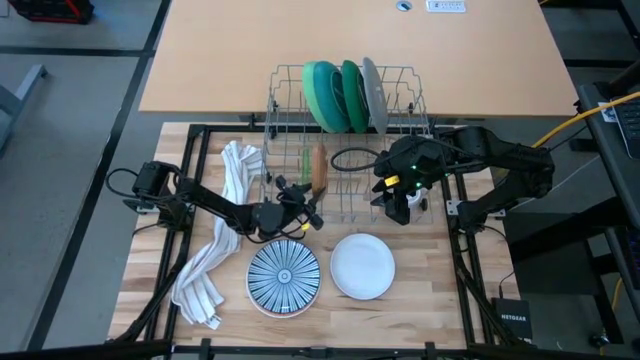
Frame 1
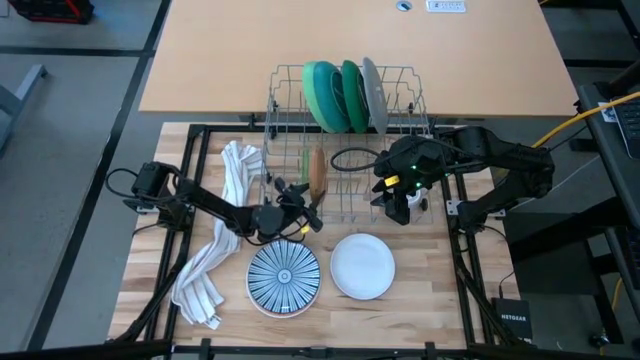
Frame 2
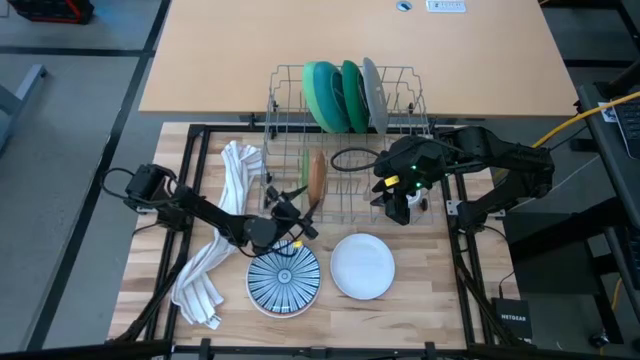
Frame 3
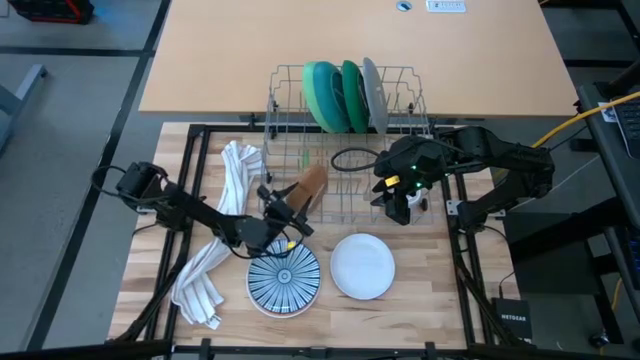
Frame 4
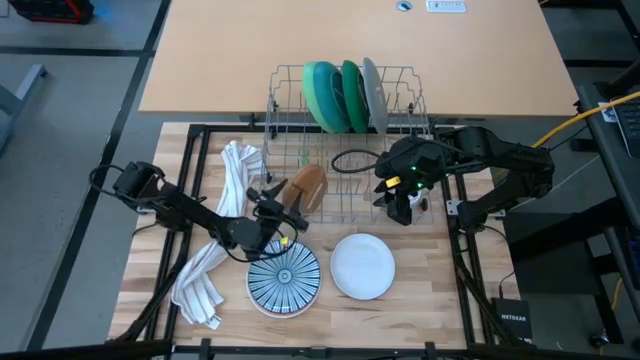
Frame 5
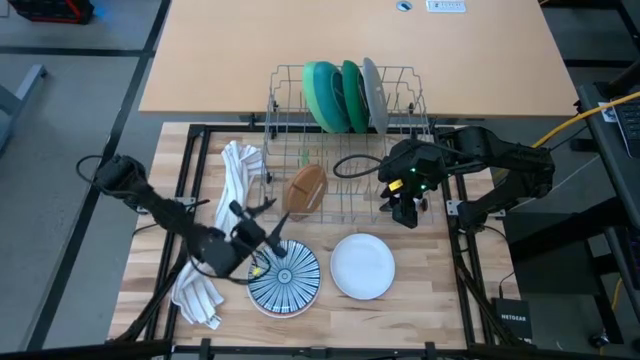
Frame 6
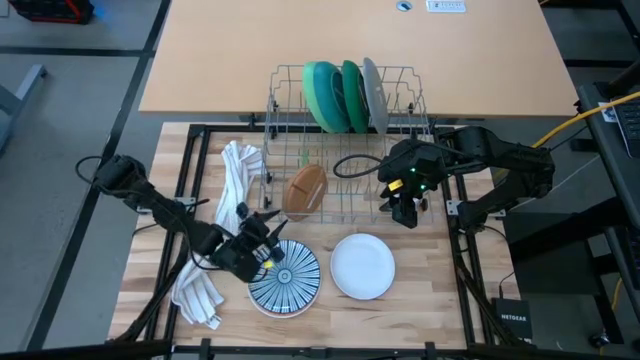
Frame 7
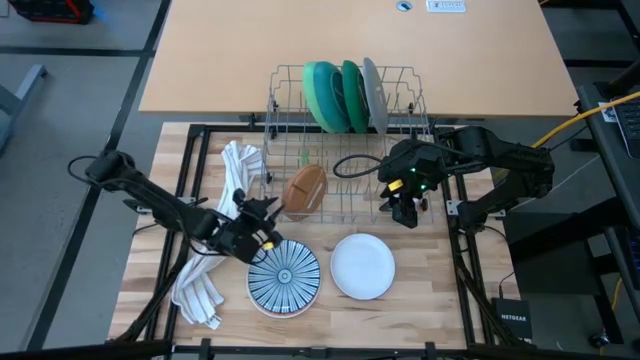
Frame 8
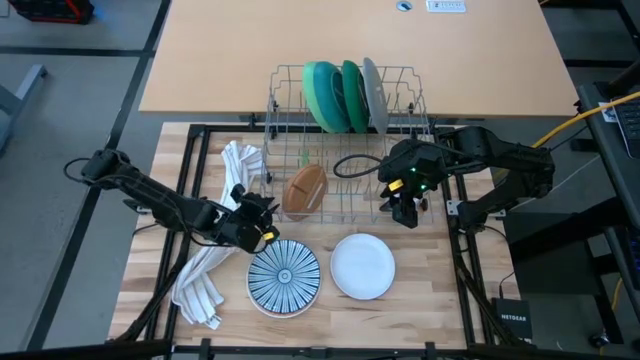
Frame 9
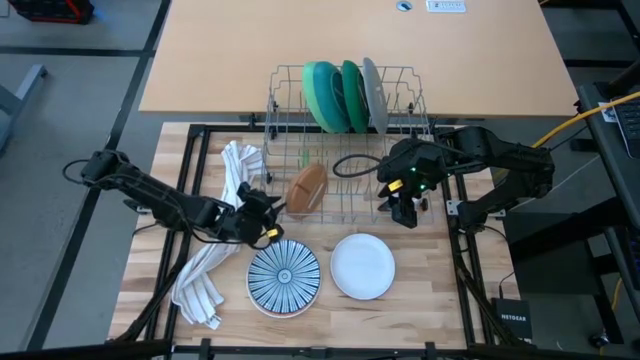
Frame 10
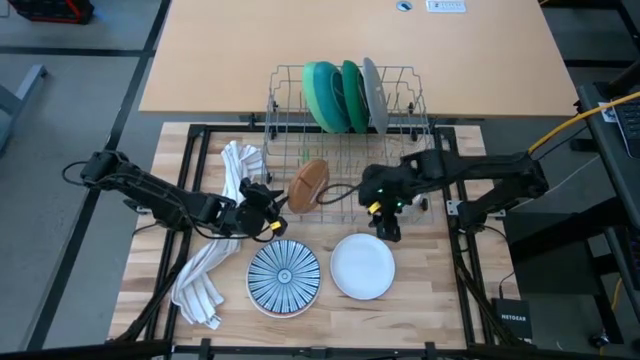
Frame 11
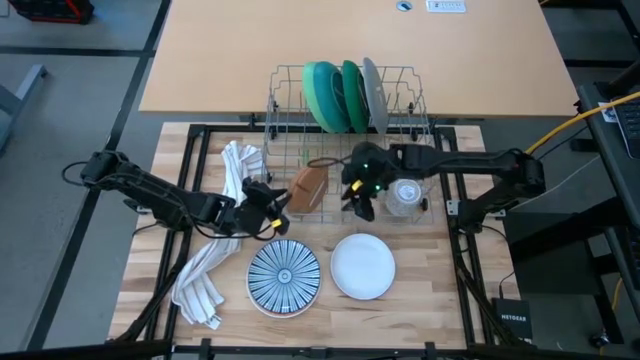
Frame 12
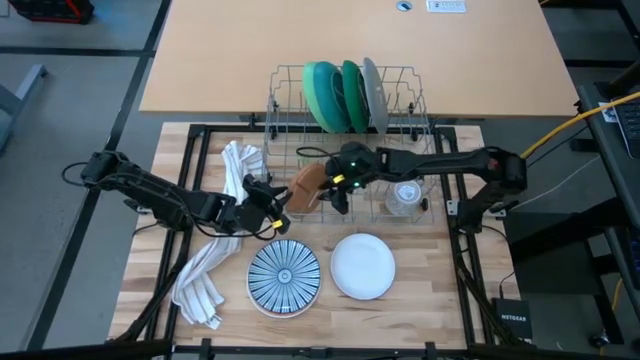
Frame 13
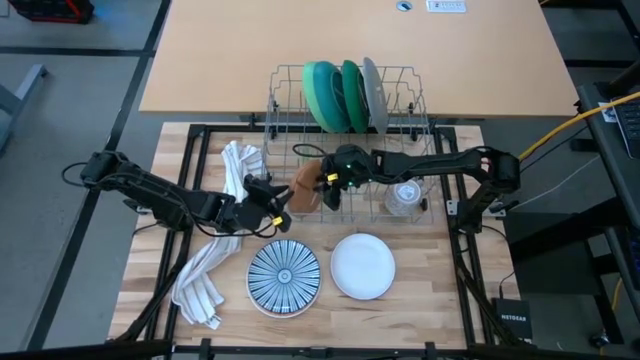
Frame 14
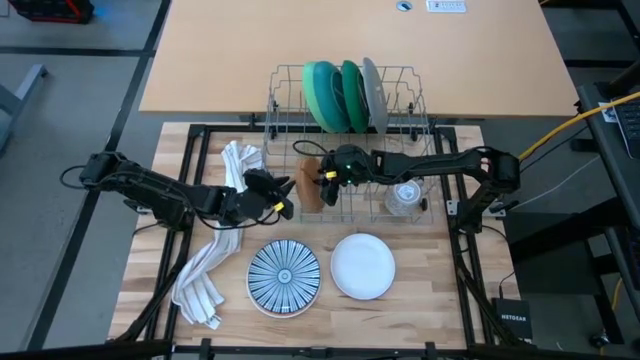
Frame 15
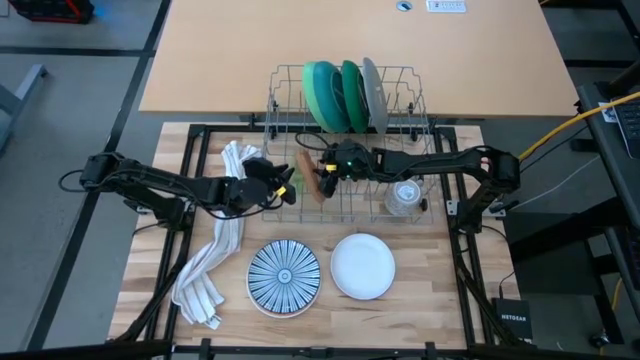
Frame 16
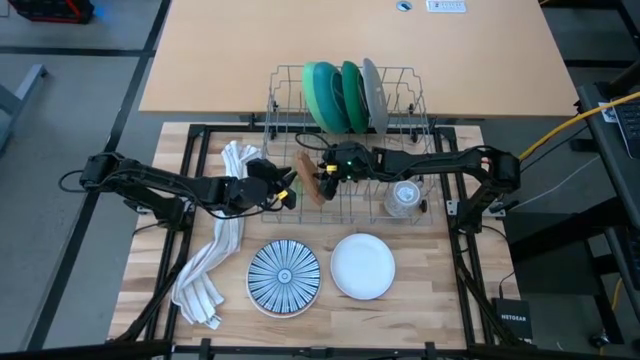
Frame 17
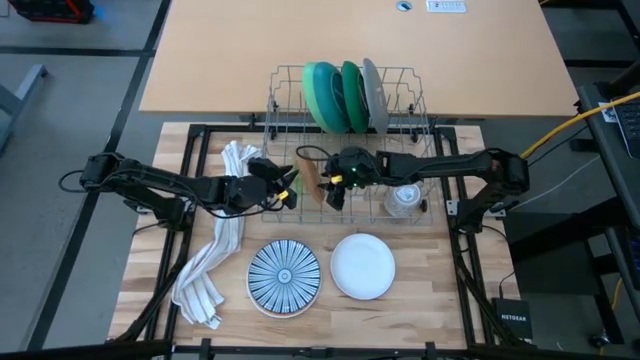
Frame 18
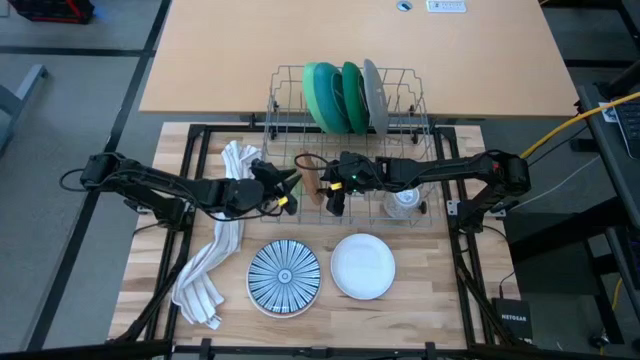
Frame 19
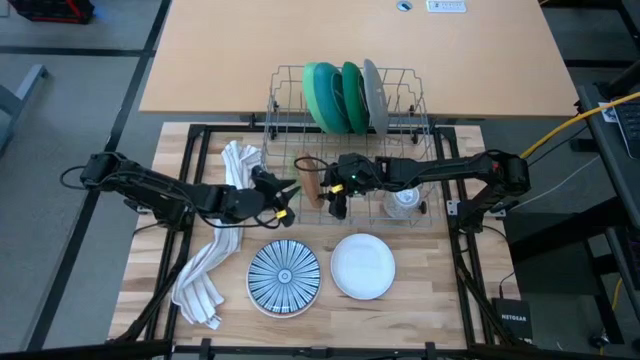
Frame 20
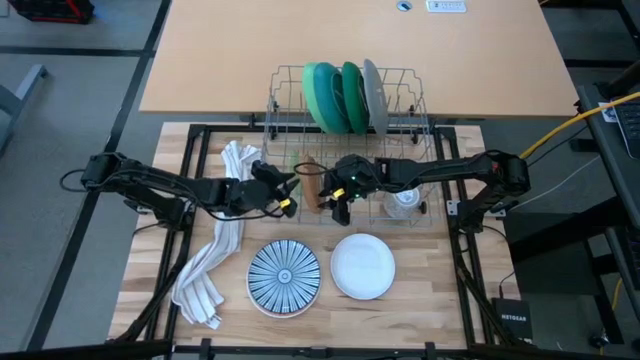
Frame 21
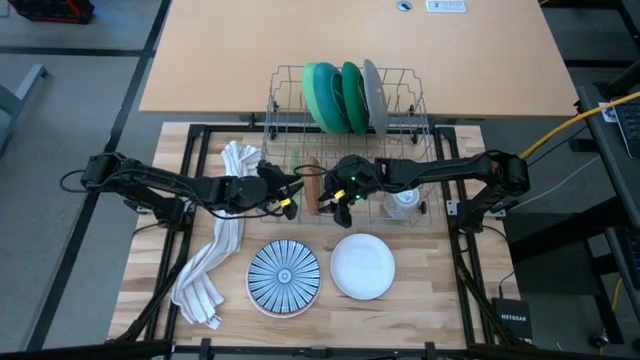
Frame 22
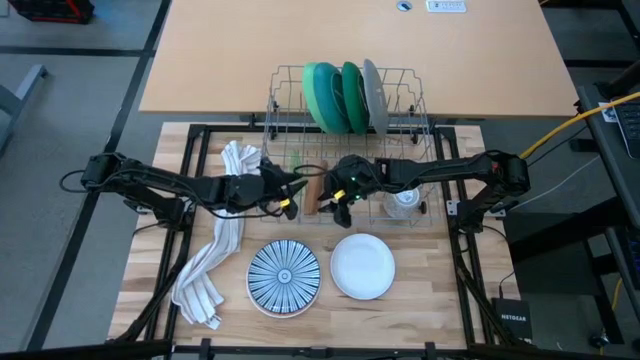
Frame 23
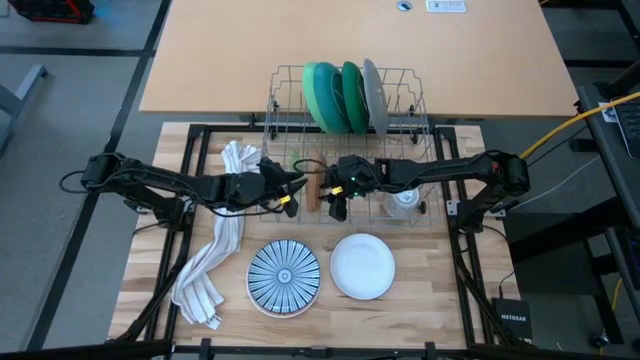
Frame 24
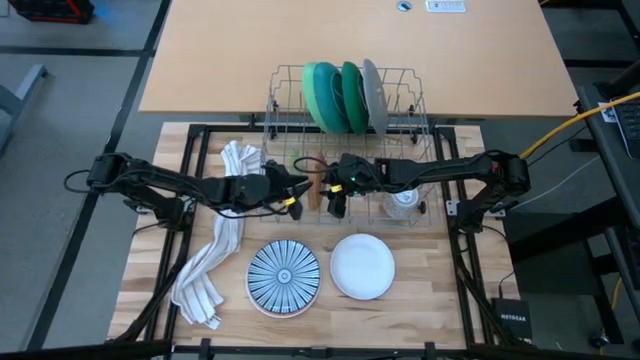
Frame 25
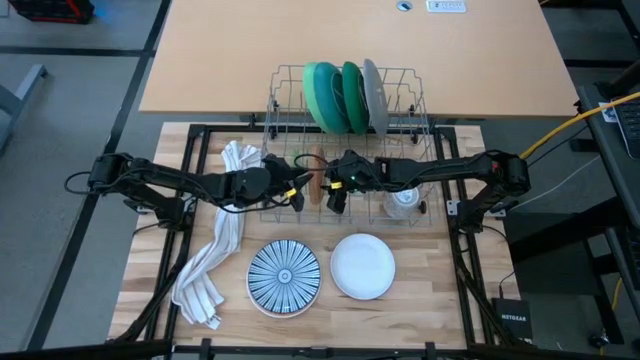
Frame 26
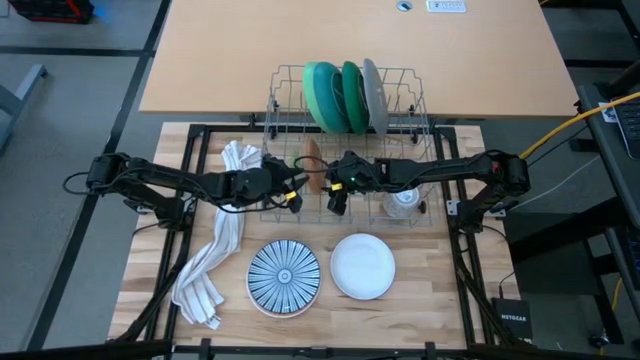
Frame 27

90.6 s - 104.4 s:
Task: Sort dishes
Put the brown plate into the dish rack

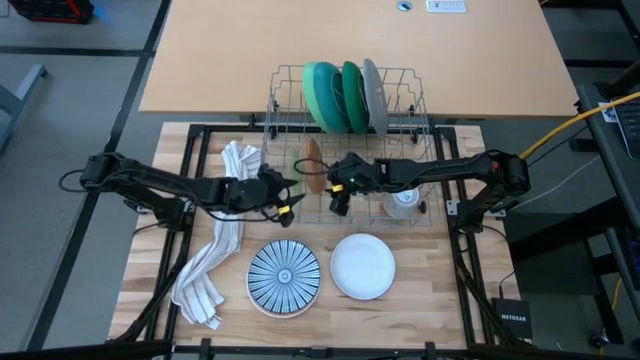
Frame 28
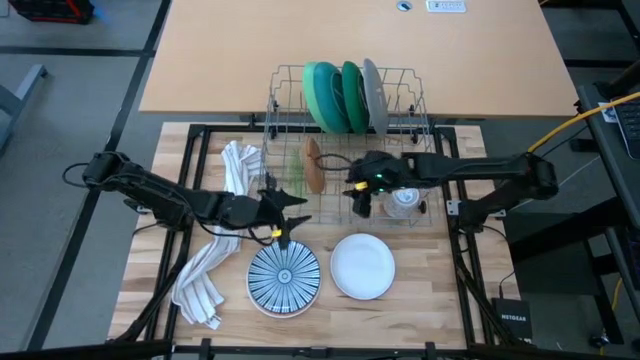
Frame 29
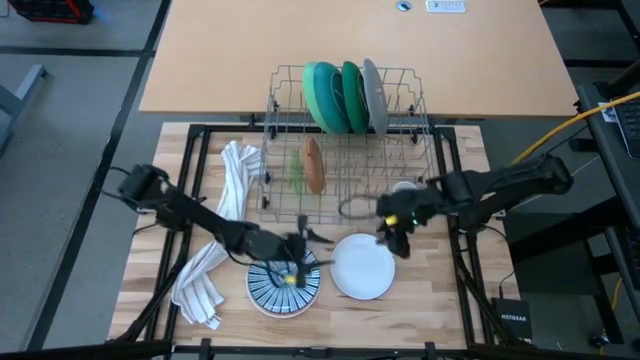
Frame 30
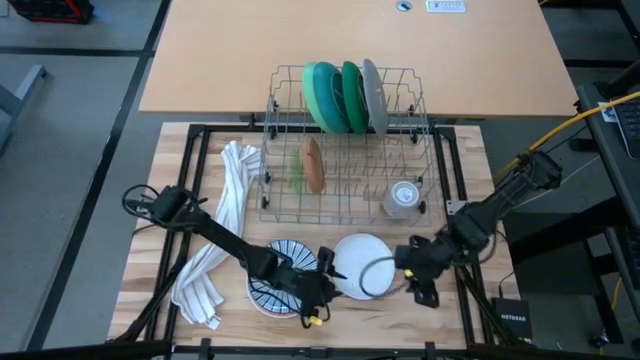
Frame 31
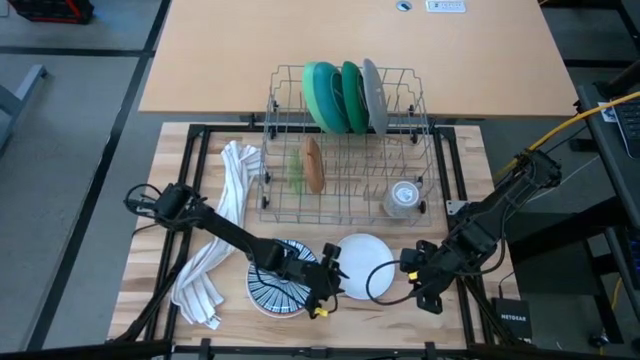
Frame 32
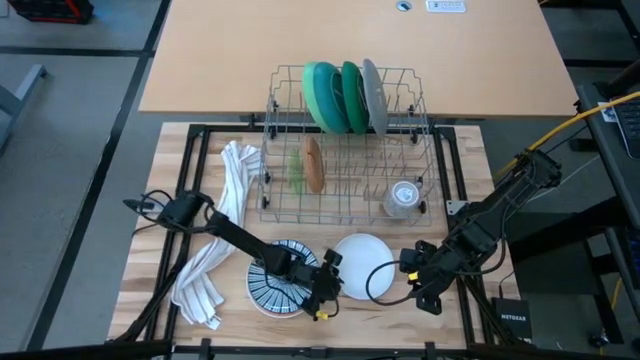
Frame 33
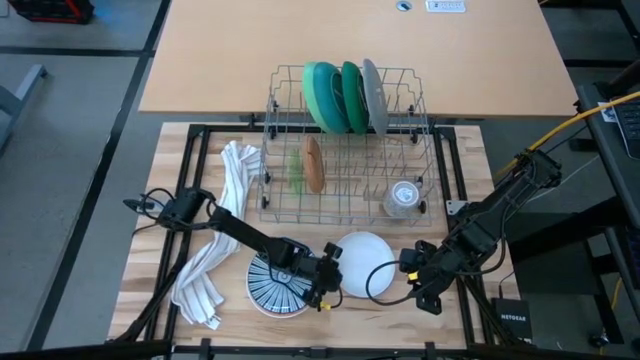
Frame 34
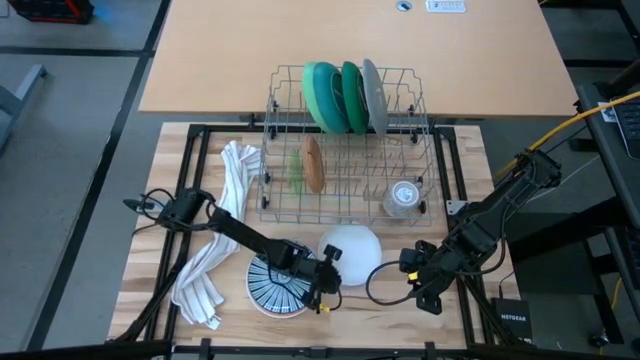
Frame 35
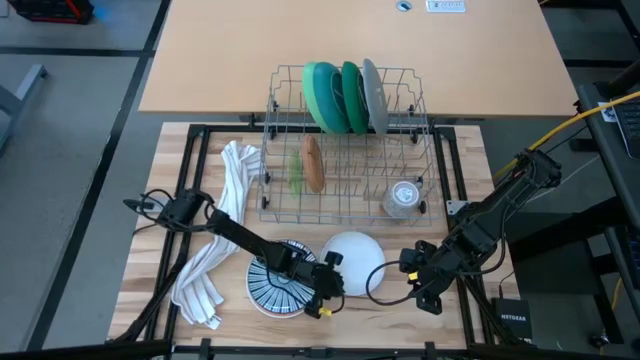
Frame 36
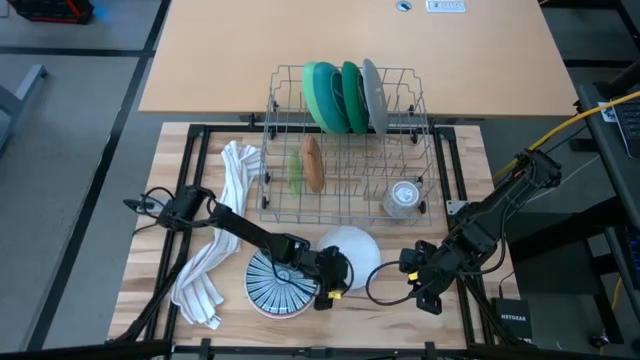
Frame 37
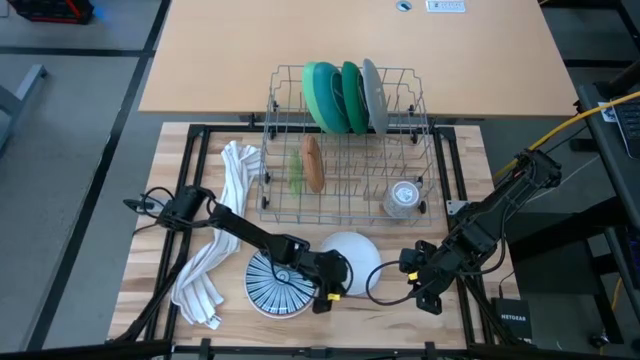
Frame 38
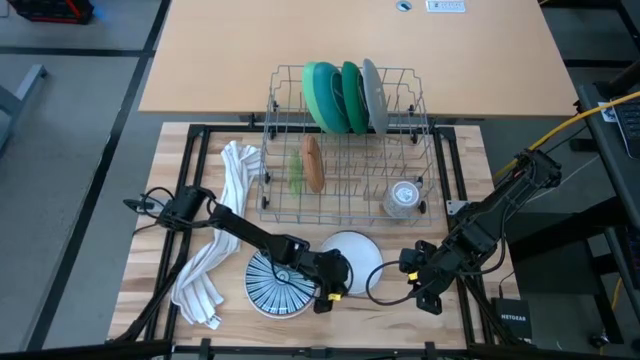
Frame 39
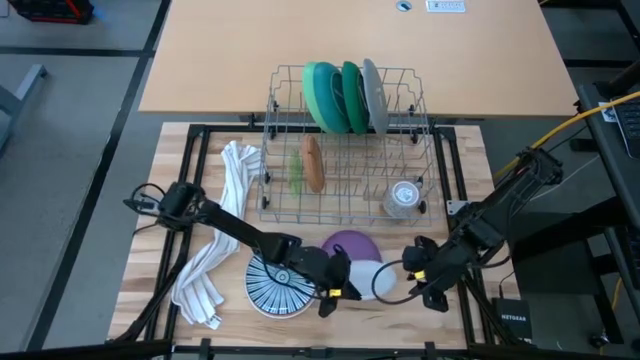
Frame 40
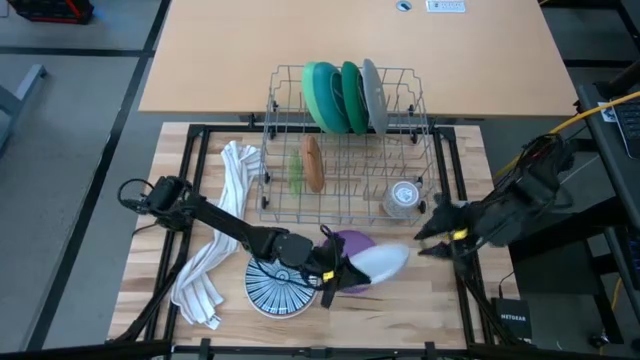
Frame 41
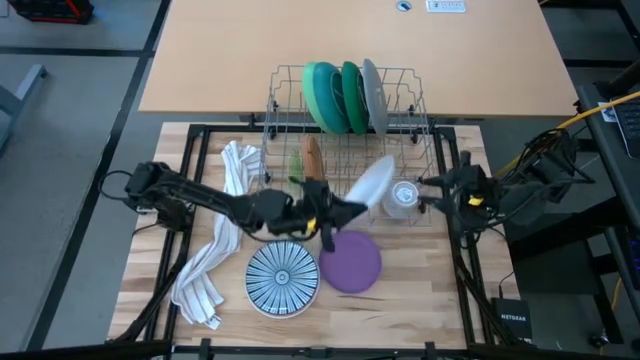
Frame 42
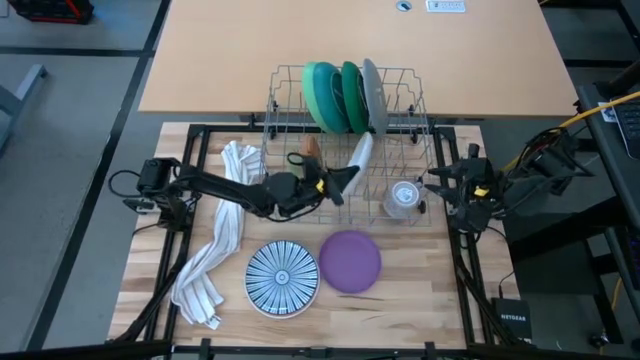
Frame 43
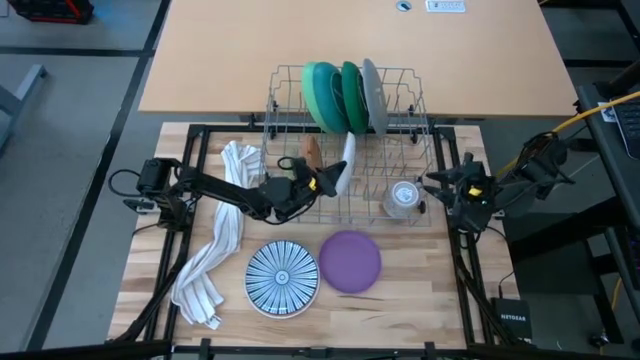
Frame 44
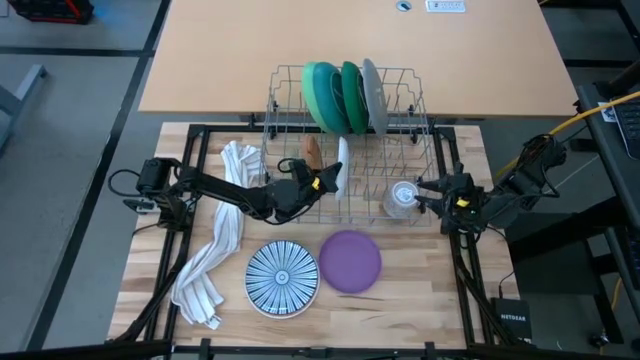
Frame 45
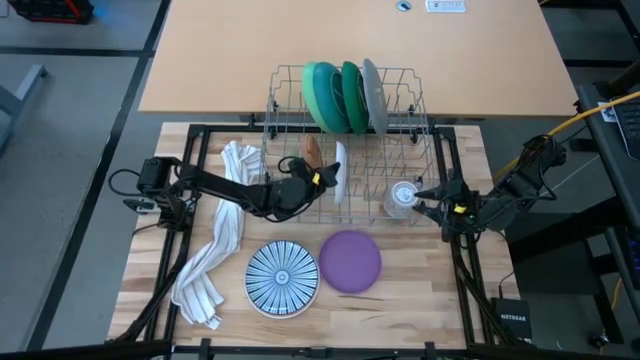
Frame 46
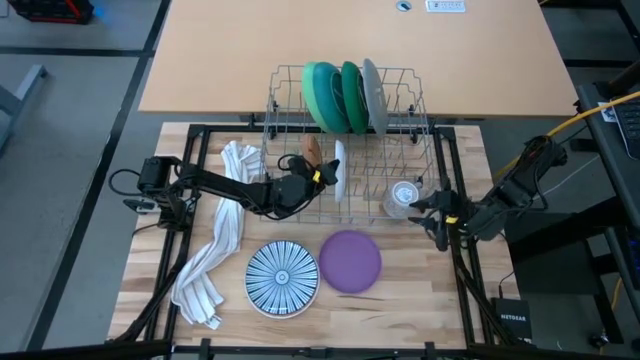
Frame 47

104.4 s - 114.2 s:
Put the white plate into the dish rack
